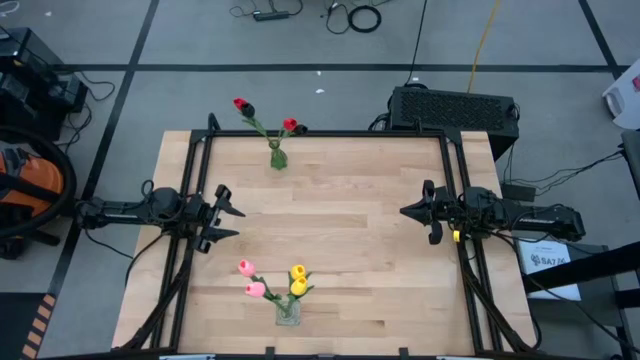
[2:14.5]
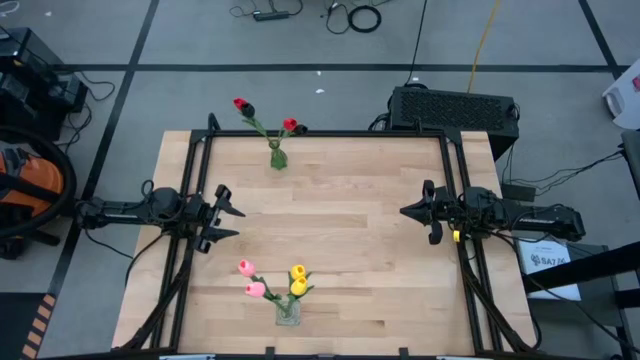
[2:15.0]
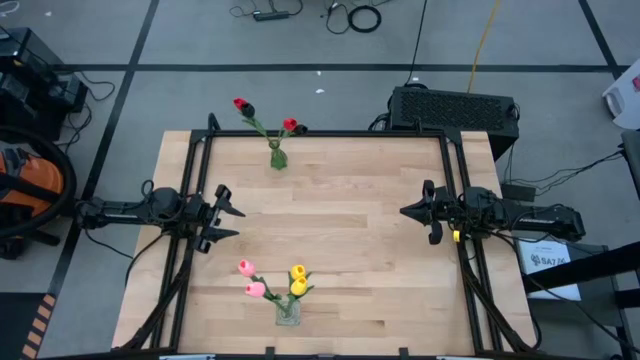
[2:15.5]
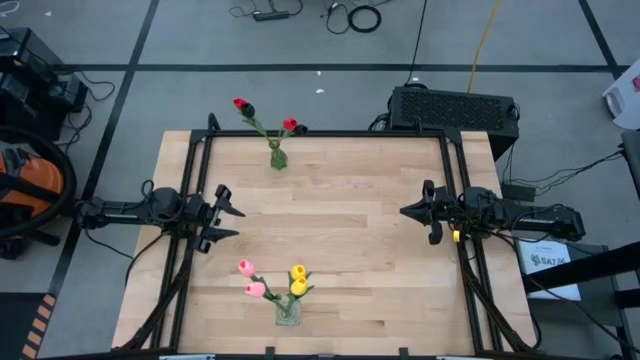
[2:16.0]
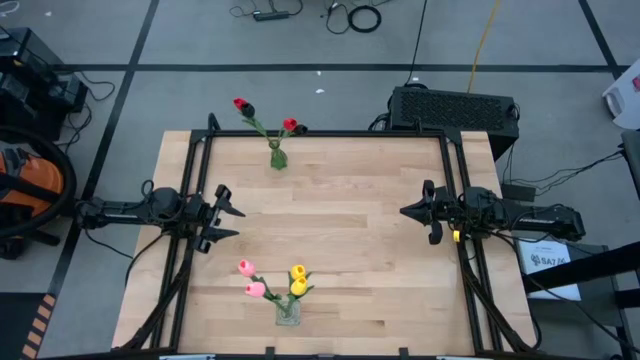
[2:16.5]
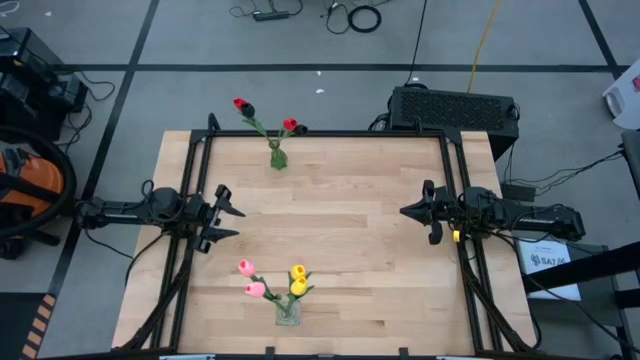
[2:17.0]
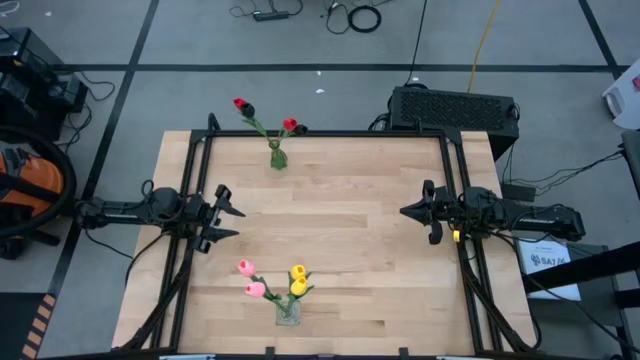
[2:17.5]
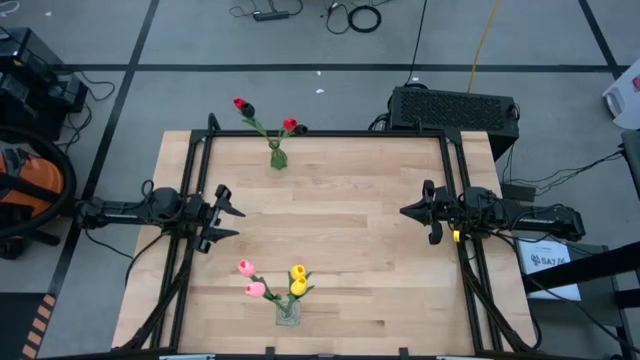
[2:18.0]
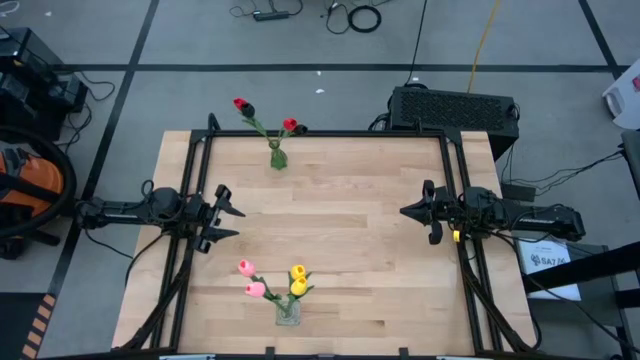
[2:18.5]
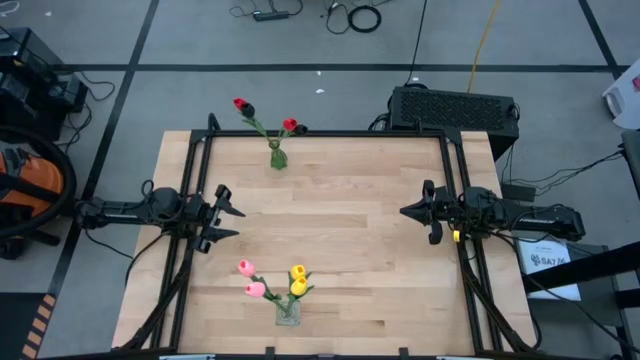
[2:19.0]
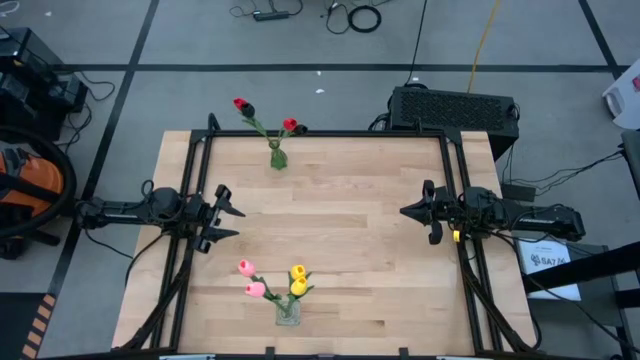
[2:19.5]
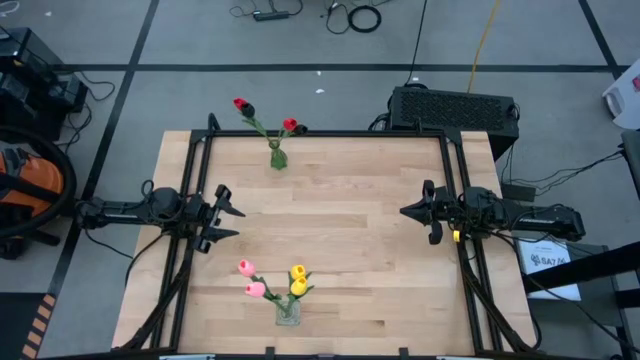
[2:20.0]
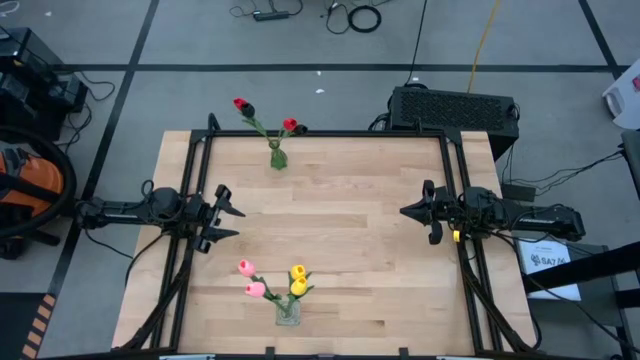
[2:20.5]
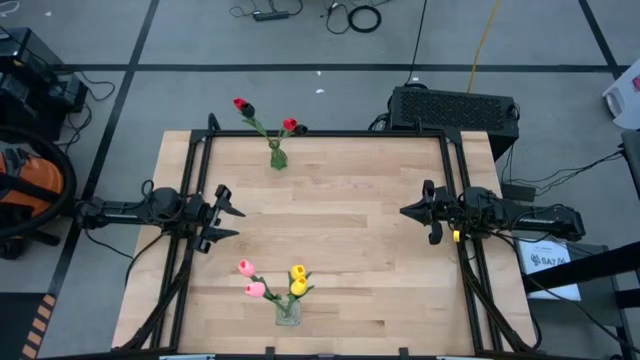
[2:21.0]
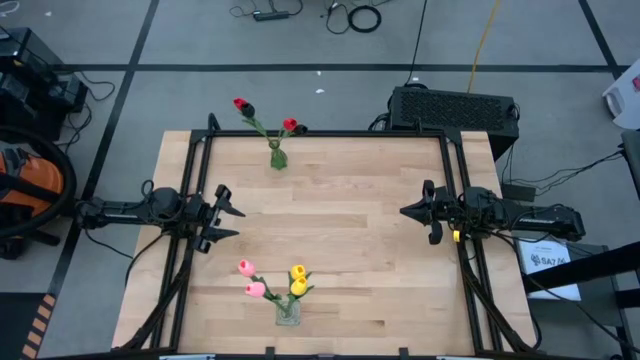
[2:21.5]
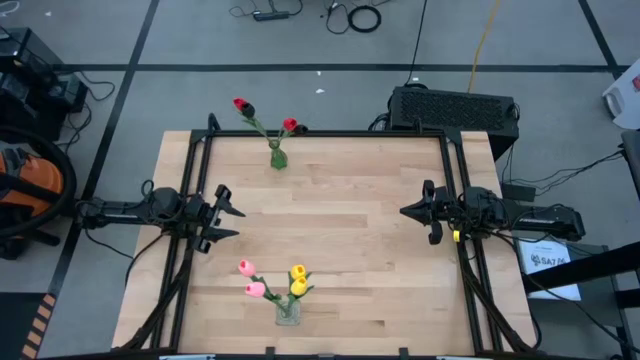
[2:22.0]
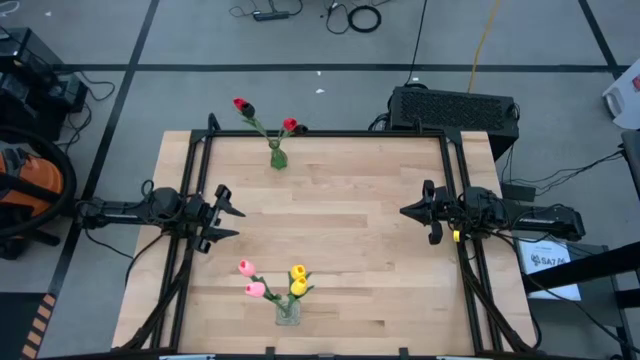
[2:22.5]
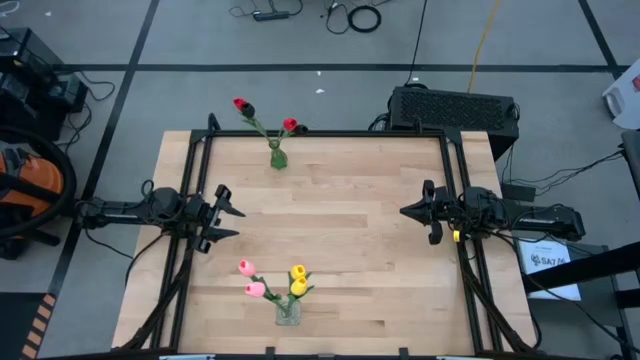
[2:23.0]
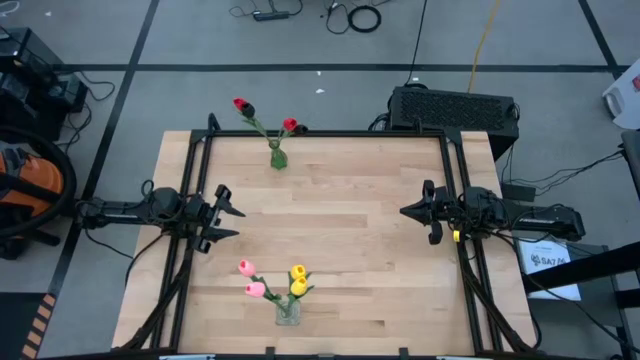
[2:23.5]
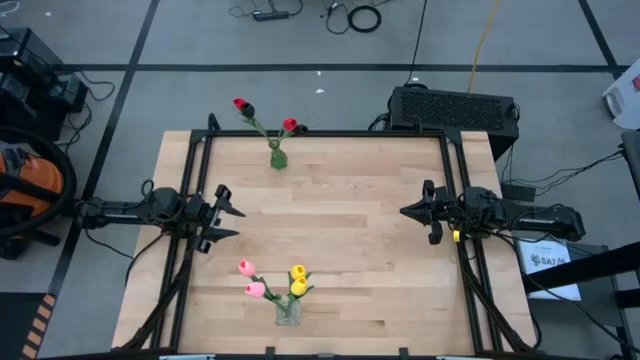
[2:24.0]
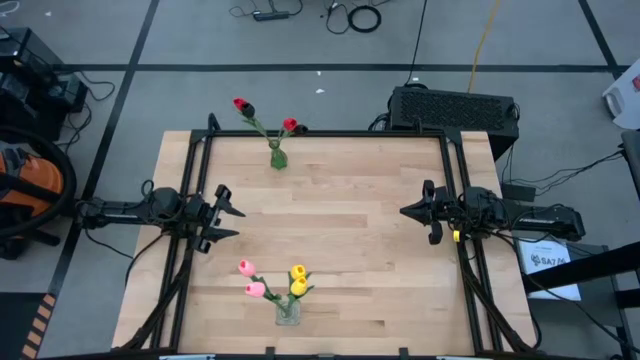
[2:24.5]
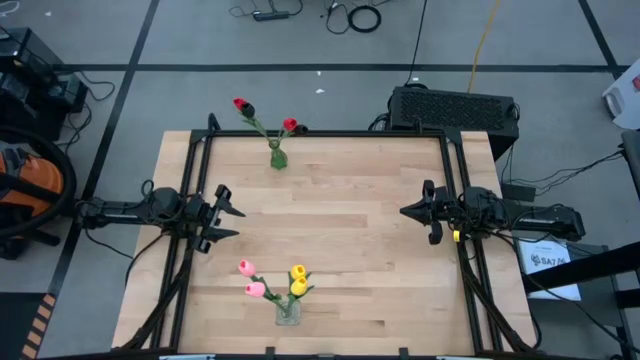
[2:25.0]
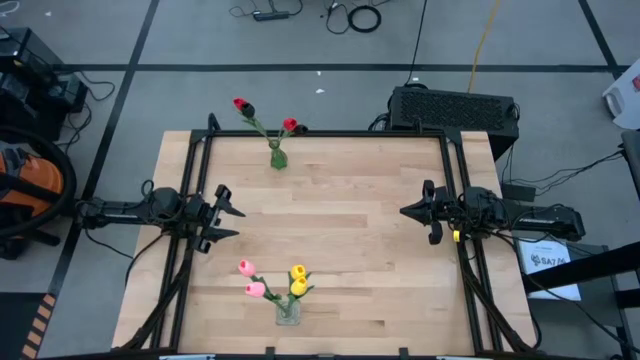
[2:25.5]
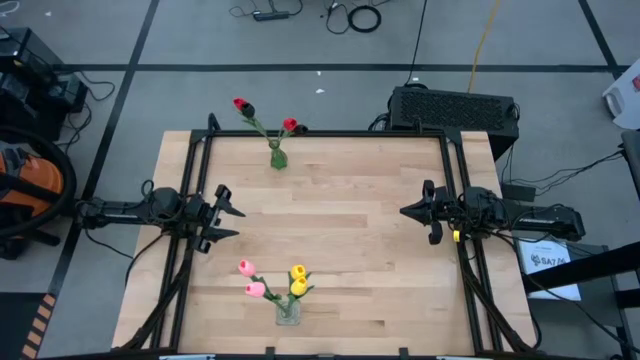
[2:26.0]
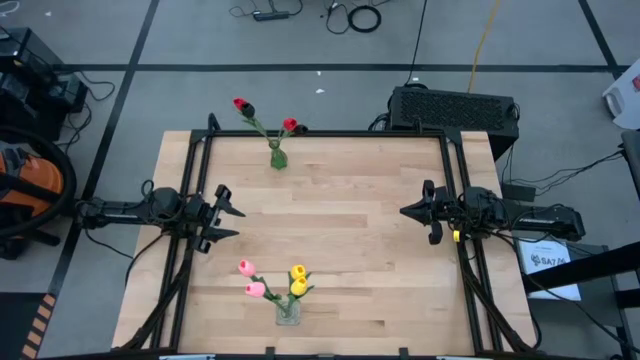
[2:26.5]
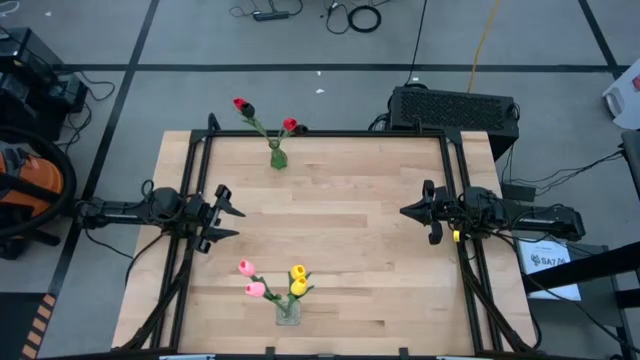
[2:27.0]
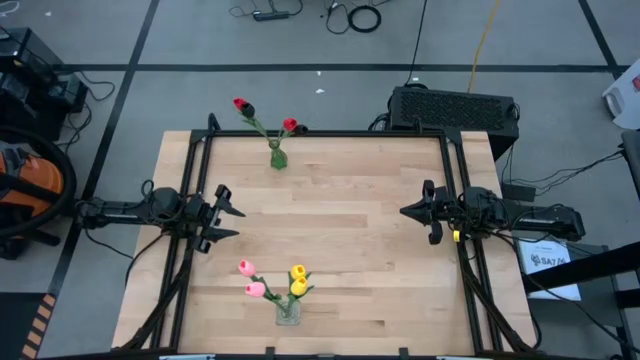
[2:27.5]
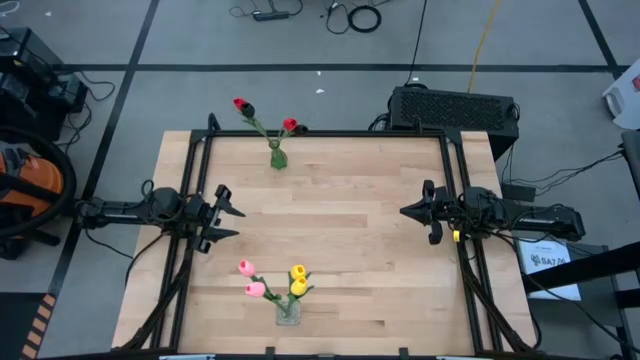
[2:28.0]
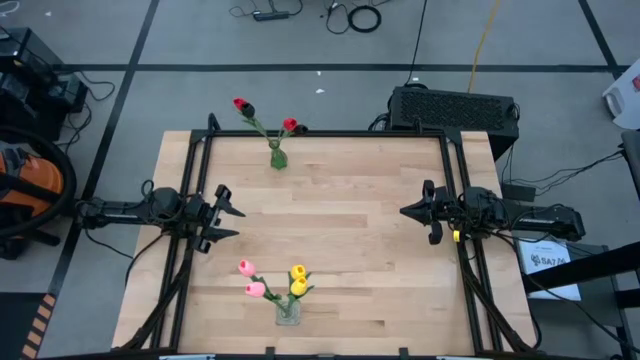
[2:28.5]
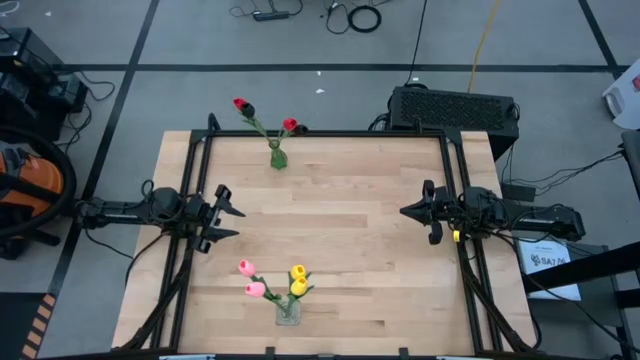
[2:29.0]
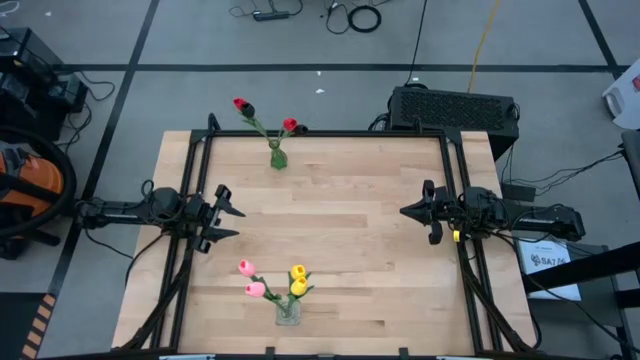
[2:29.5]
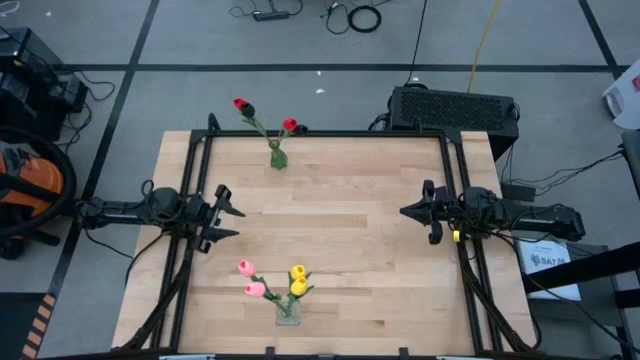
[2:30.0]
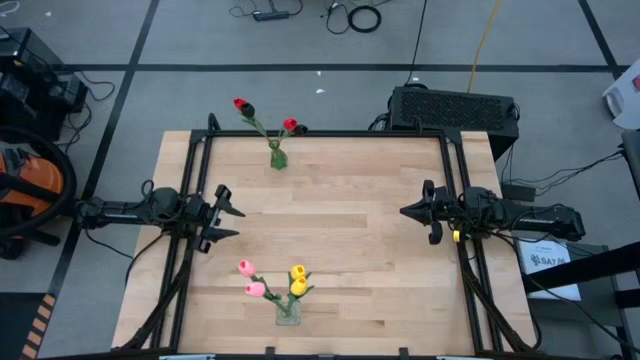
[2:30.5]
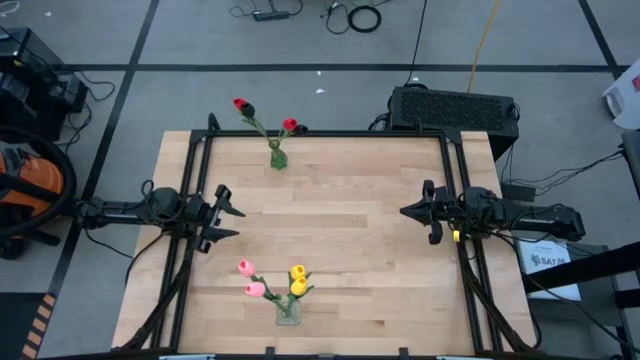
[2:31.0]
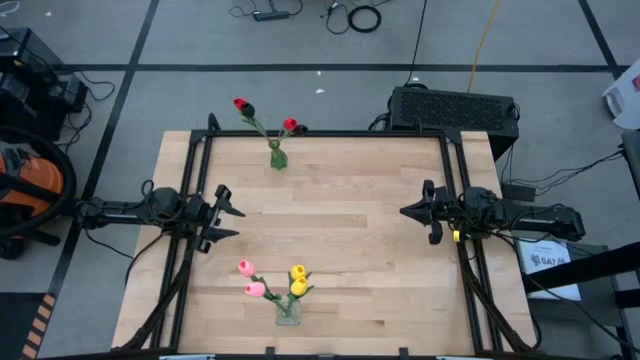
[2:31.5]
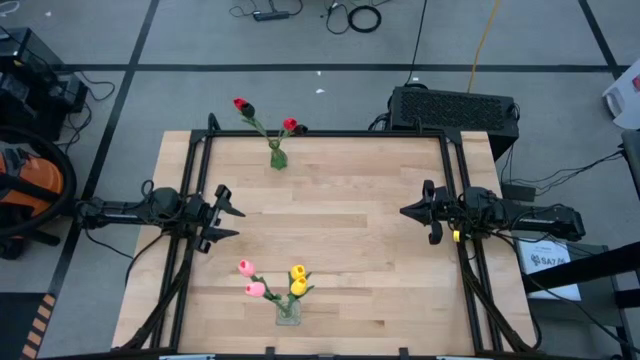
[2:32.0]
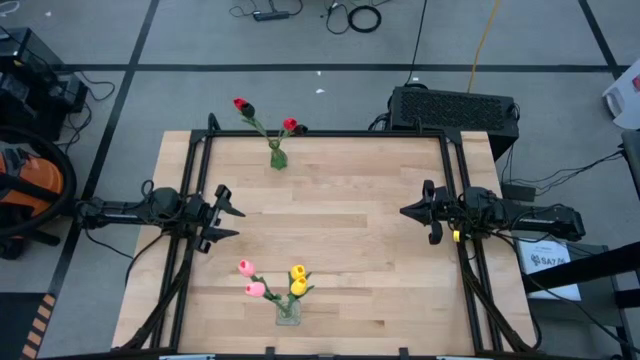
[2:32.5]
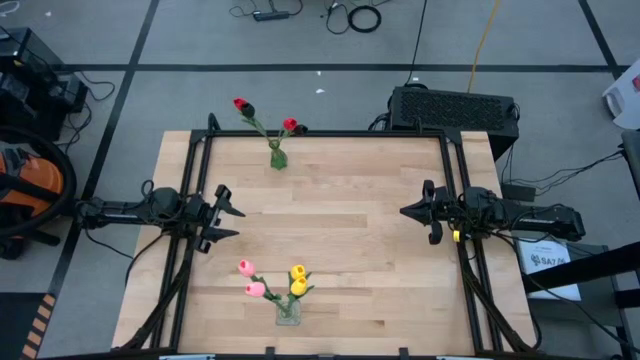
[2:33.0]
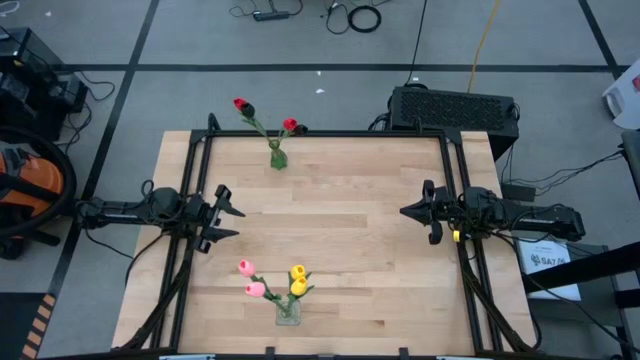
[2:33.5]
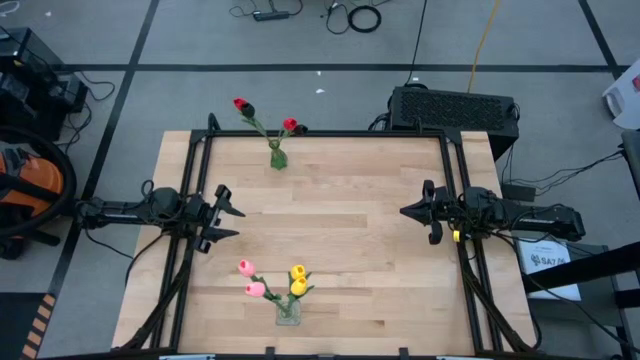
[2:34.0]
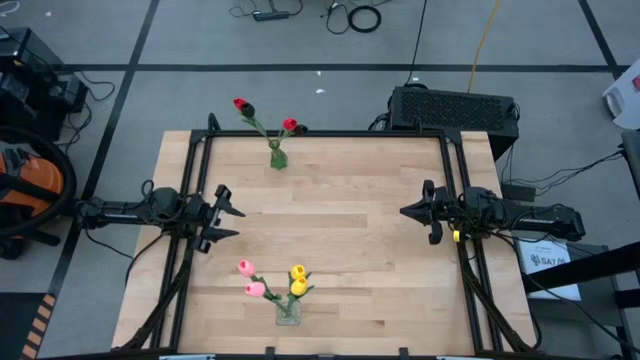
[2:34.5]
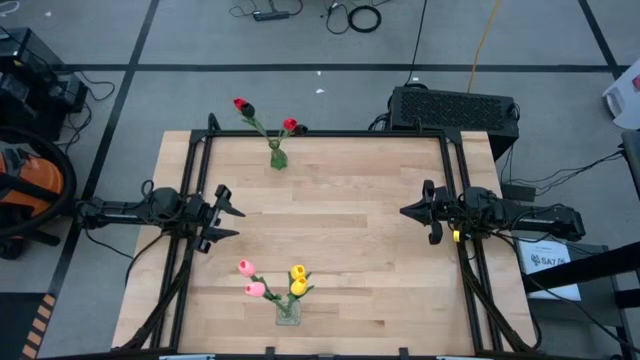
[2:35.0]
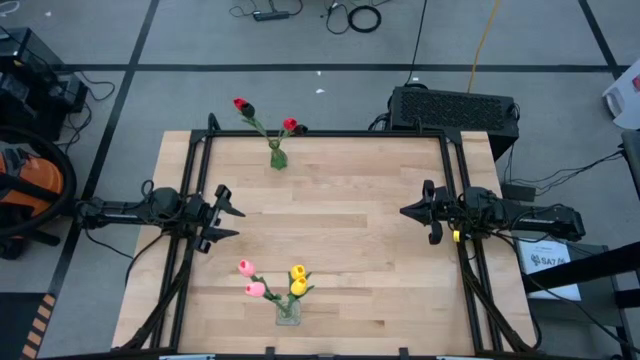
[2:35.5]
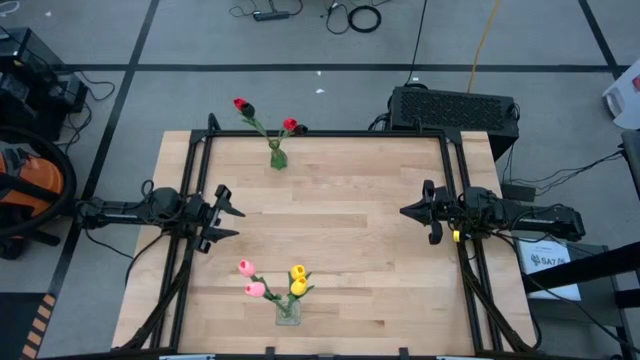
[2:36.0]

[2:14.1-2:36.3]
Task: Sort flowers into vase by color
Return to Home Position
